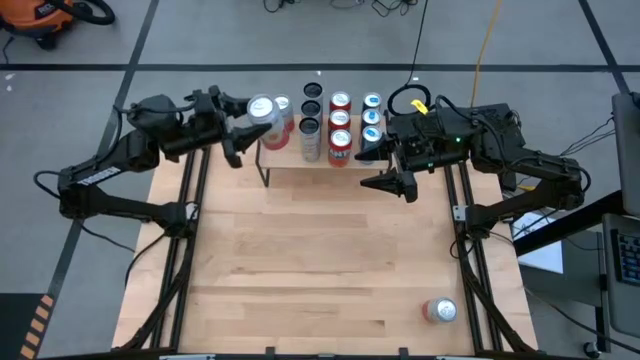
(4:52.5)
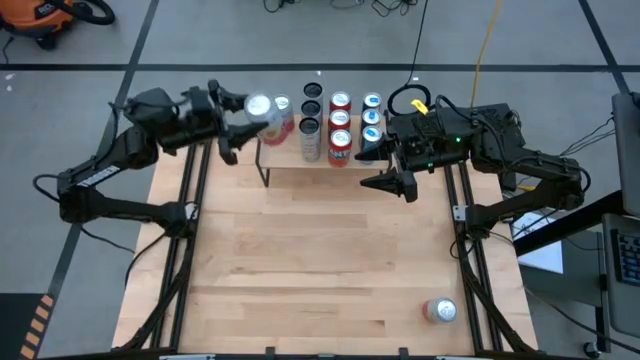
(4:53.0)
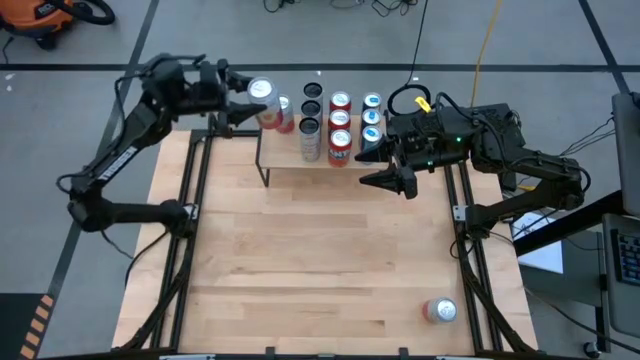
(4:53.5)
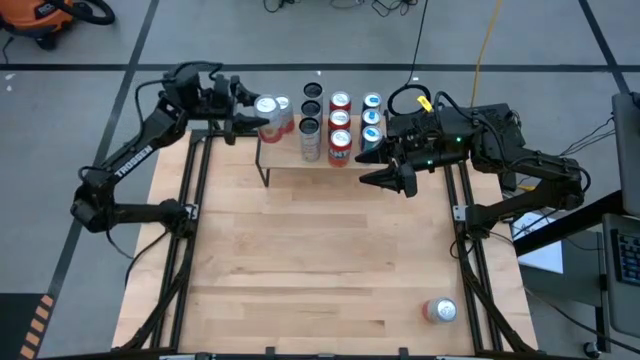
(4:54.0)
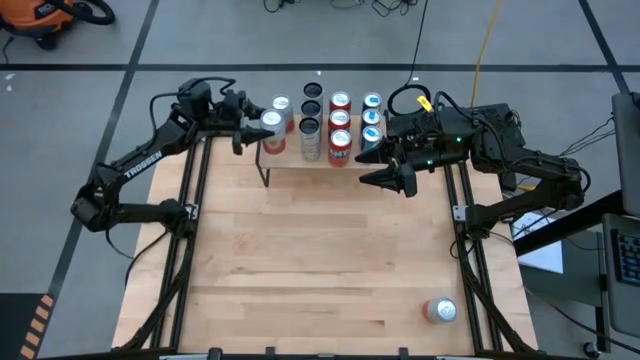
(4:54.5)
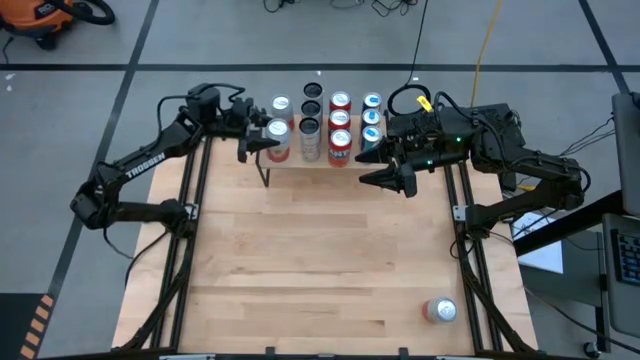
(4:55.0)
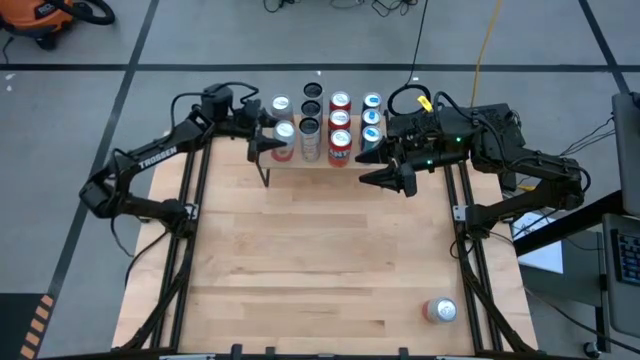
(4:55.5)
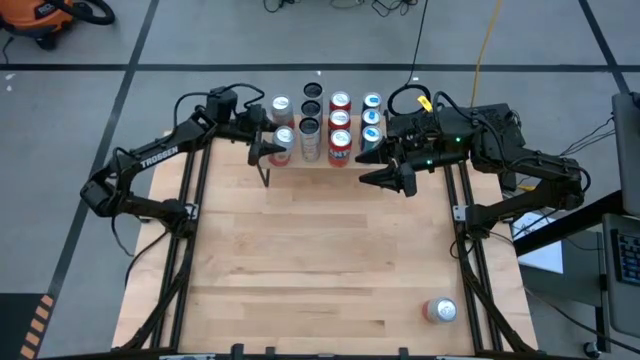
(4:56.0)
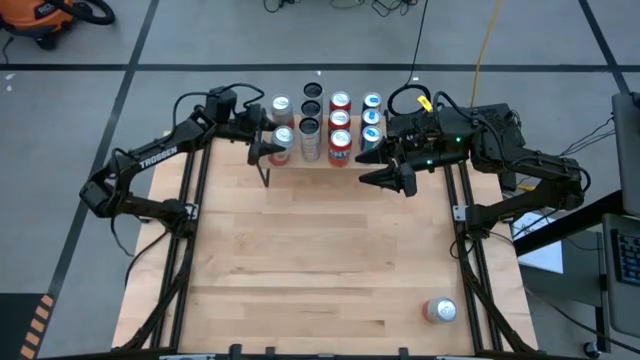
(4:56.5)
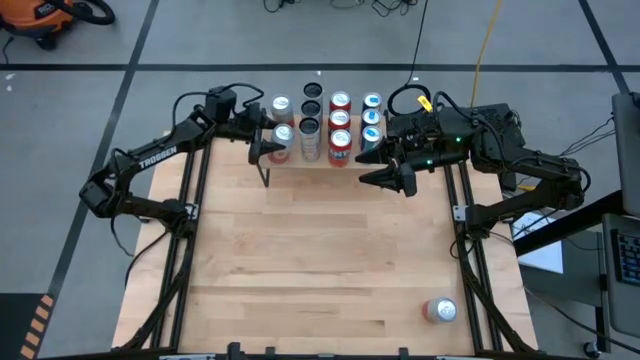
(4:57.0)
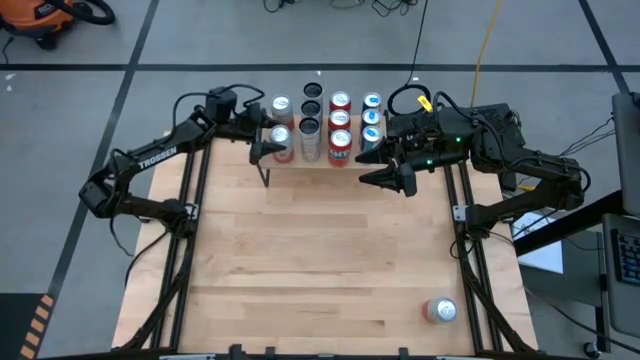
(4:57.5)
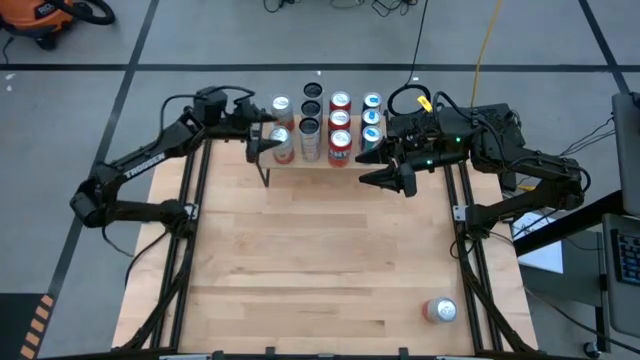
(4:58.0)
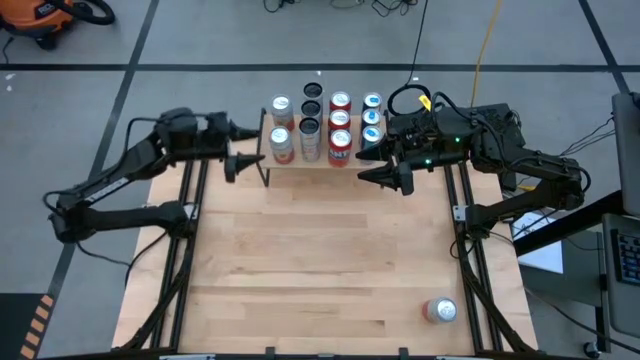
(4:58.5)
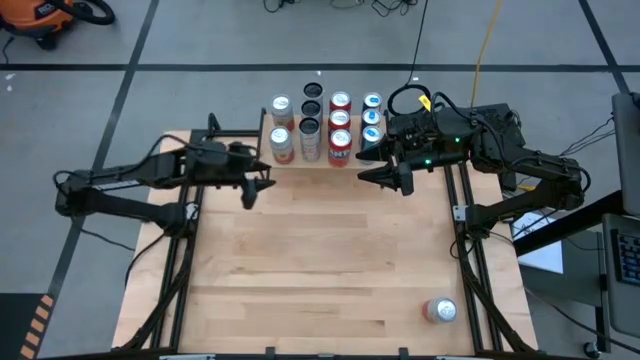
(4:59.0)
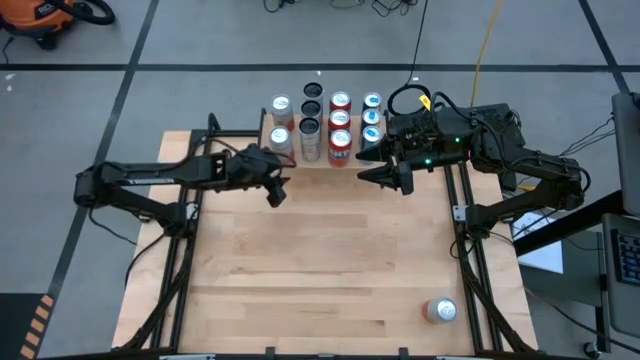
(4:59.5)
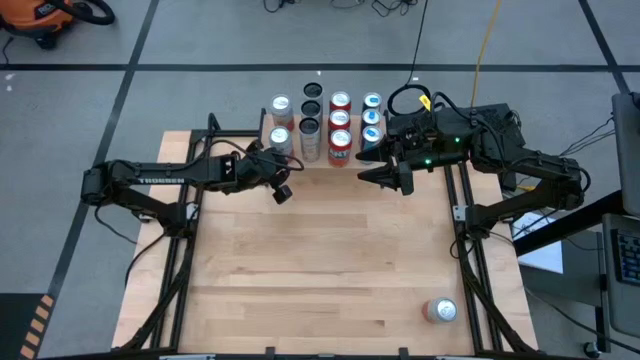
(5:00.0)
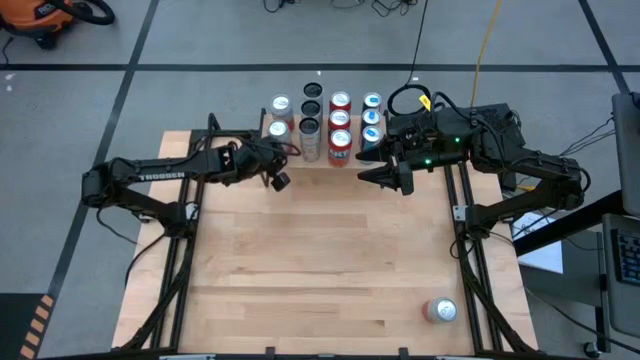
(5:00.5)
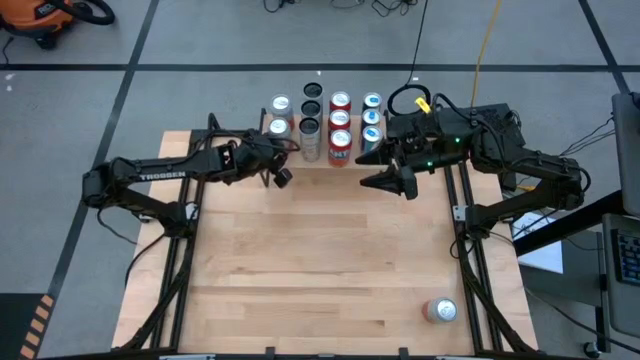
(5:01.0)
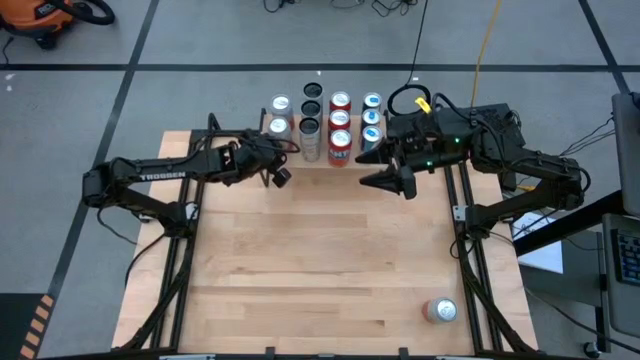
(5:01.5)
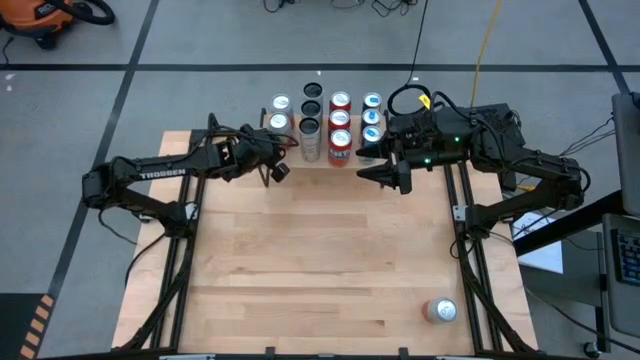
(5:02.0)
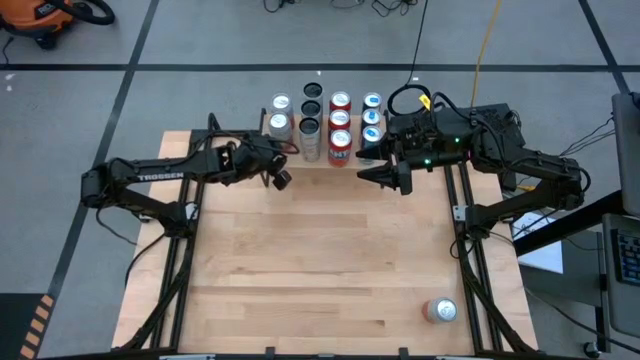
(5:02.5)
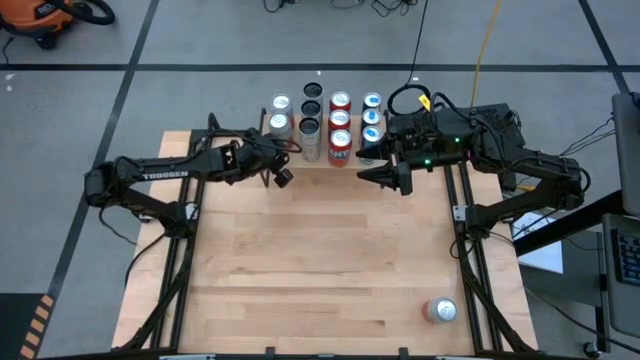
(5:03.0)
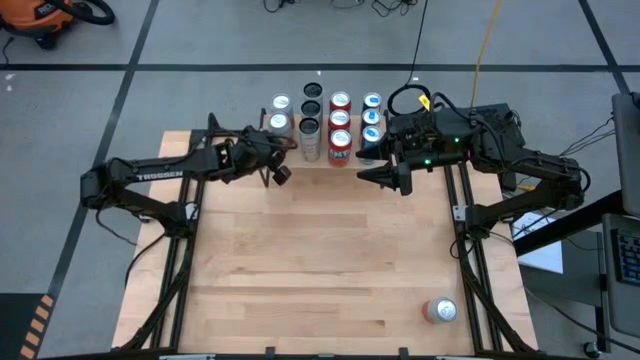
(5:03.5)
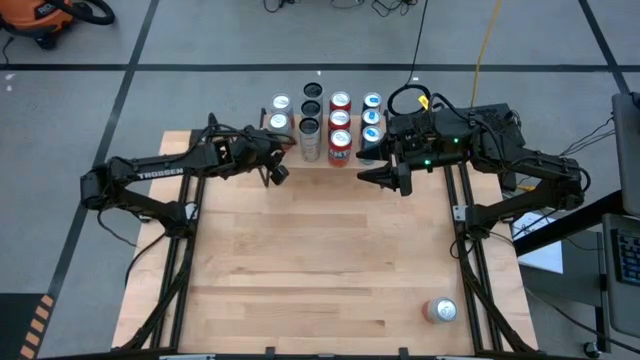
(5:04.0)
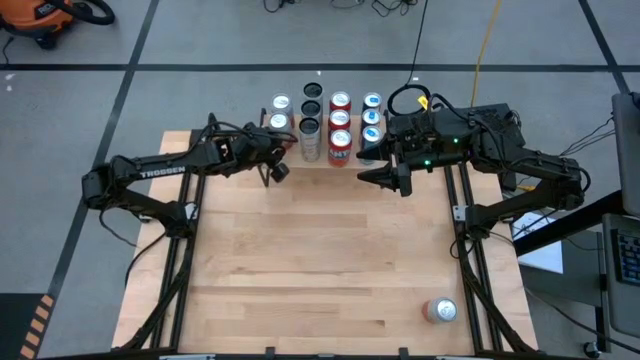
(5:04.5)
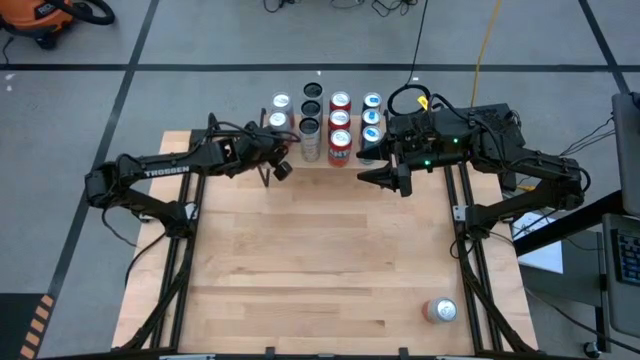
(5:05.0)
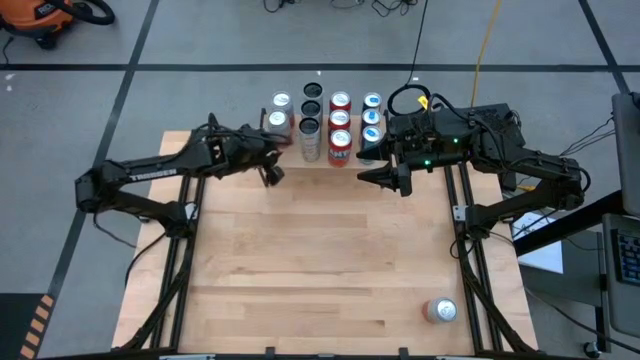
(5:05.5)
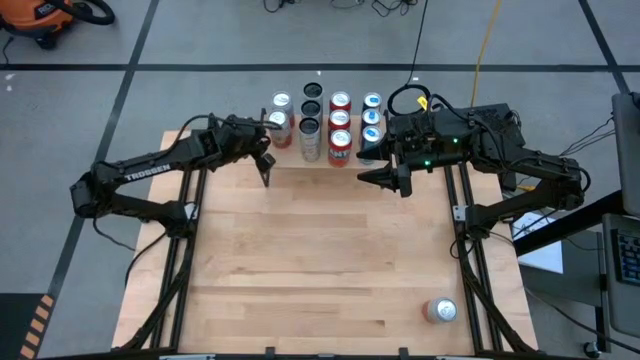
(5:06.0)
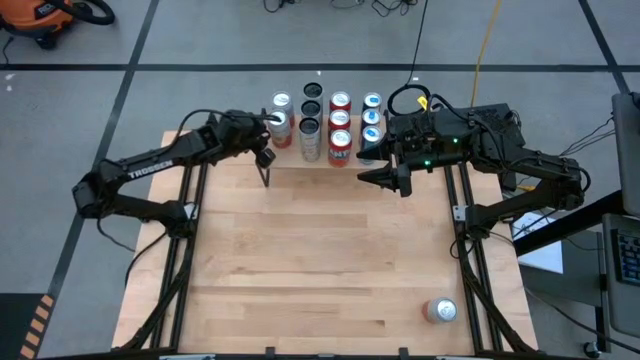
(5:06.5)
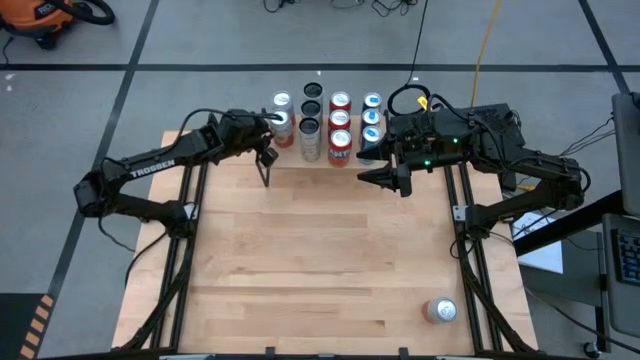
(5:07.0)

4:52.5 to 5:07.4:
Task: Place canned beverage on shelf
Put the top pink and white soda can aligned with the other pink and white soda can on the shelf
